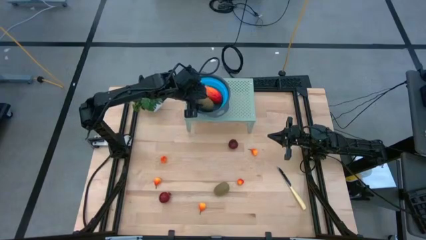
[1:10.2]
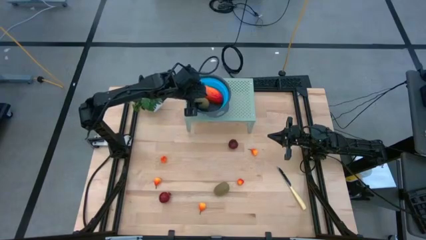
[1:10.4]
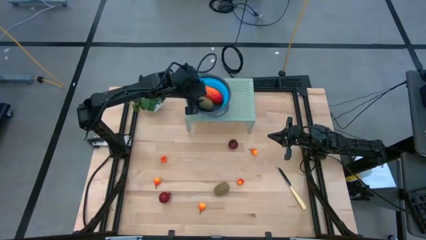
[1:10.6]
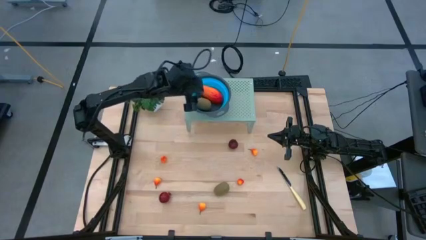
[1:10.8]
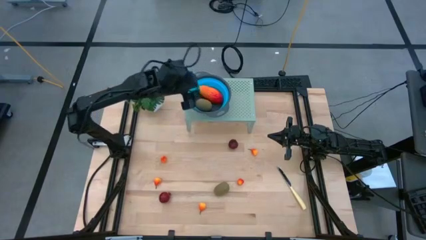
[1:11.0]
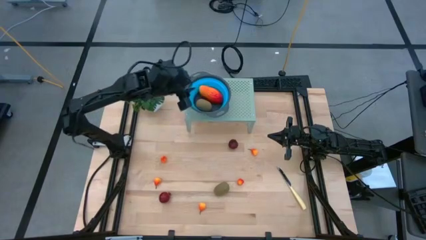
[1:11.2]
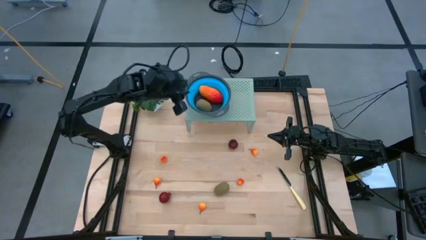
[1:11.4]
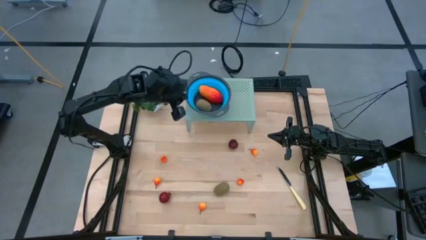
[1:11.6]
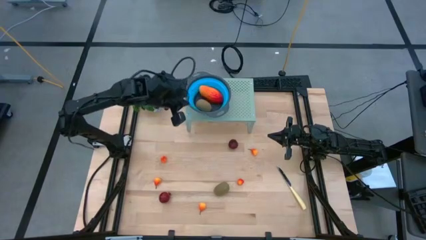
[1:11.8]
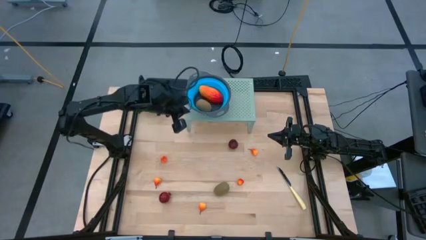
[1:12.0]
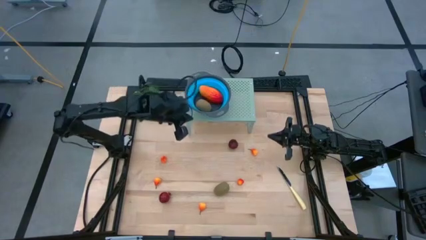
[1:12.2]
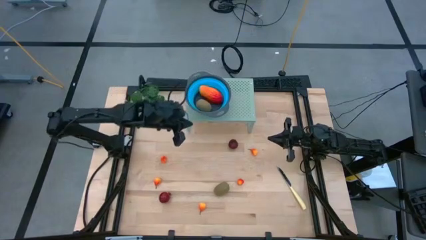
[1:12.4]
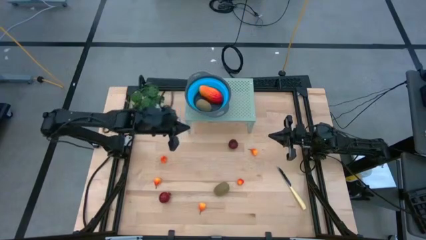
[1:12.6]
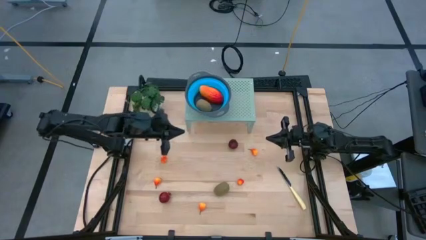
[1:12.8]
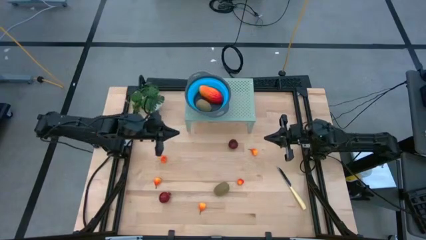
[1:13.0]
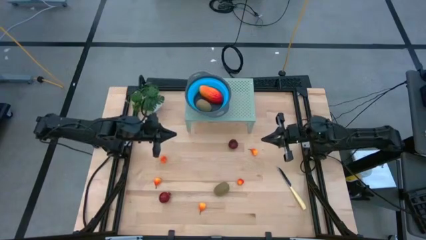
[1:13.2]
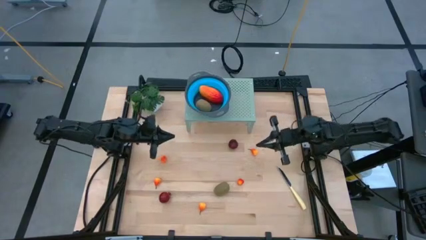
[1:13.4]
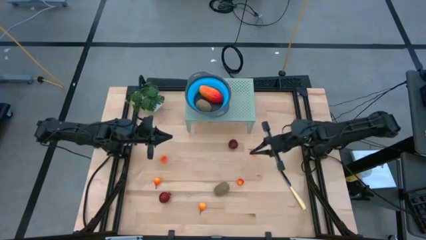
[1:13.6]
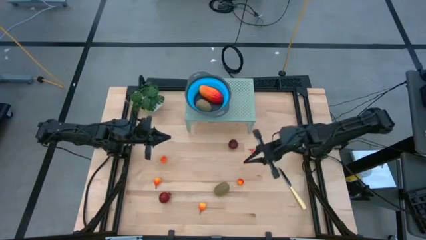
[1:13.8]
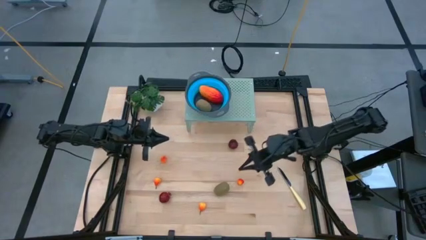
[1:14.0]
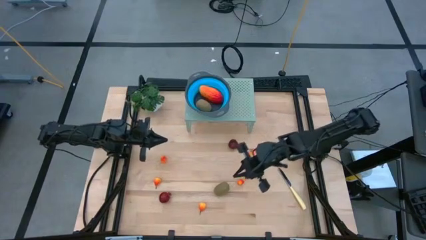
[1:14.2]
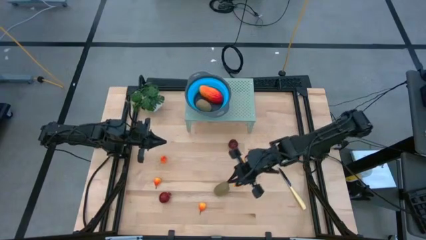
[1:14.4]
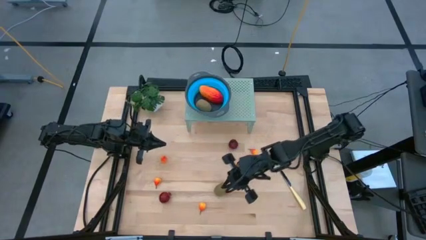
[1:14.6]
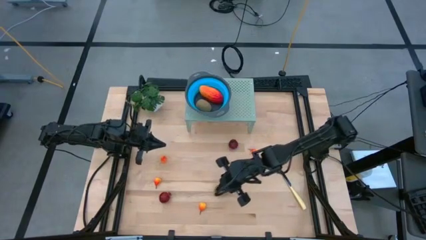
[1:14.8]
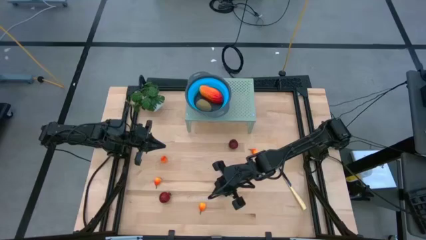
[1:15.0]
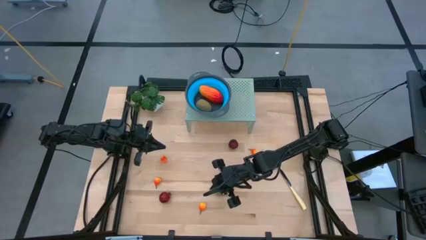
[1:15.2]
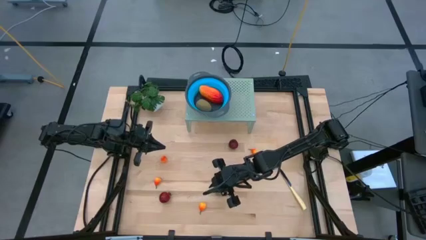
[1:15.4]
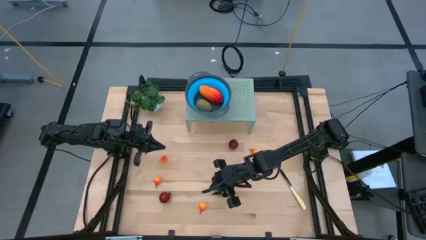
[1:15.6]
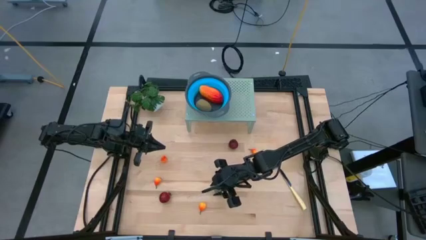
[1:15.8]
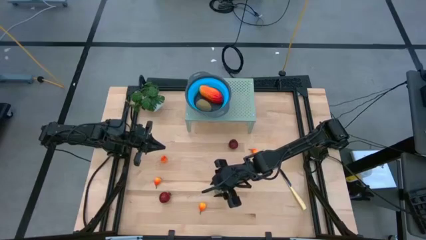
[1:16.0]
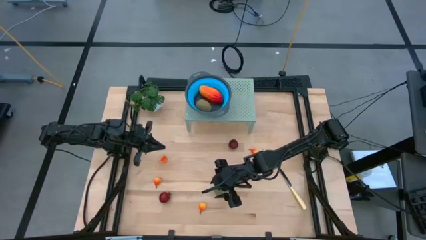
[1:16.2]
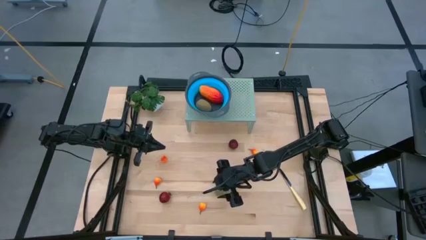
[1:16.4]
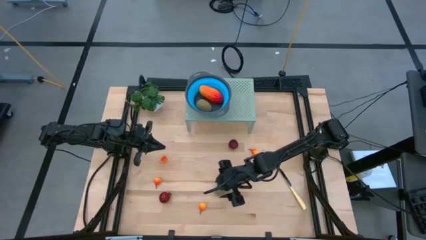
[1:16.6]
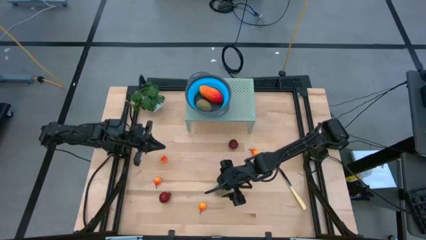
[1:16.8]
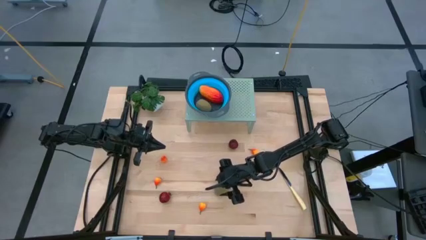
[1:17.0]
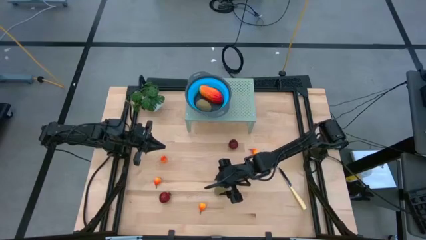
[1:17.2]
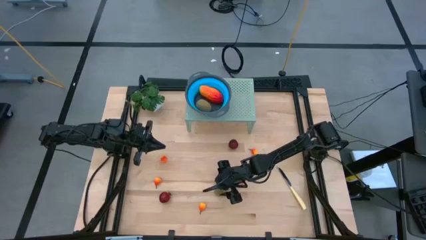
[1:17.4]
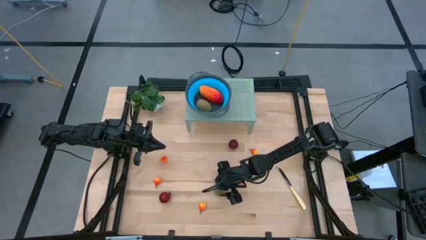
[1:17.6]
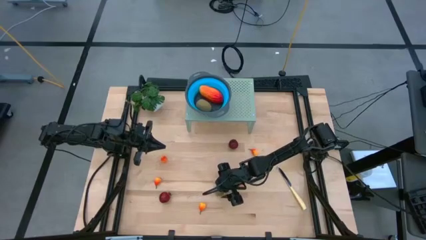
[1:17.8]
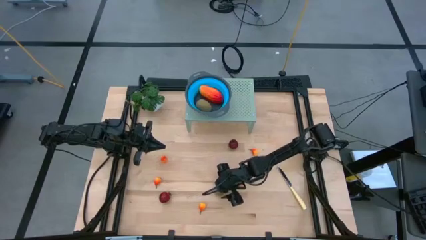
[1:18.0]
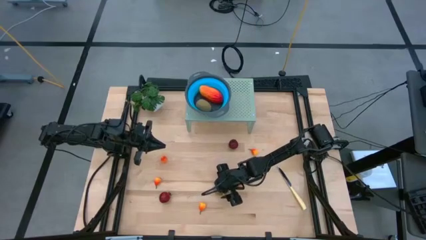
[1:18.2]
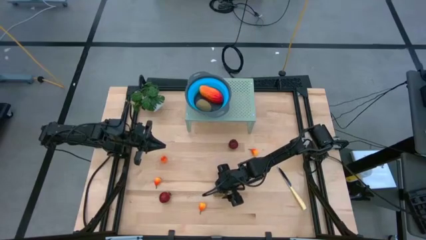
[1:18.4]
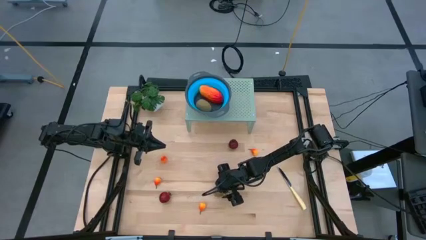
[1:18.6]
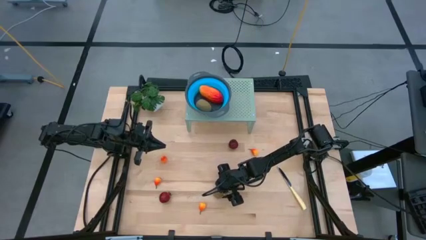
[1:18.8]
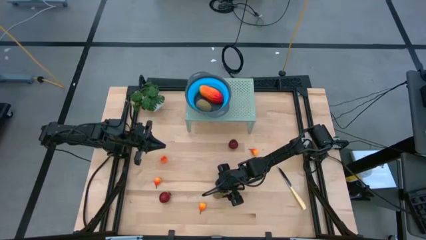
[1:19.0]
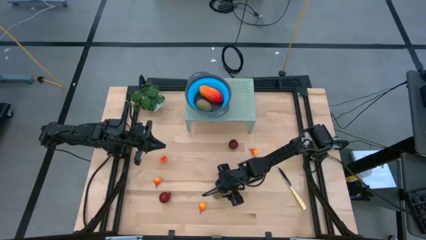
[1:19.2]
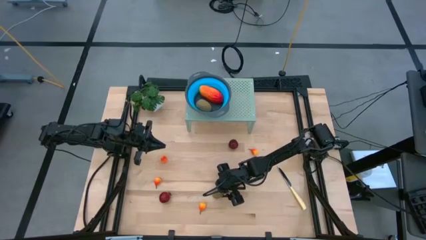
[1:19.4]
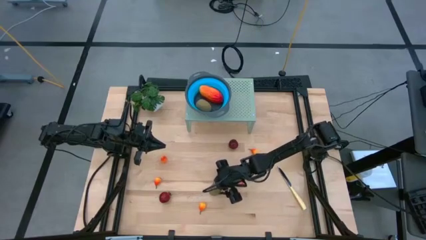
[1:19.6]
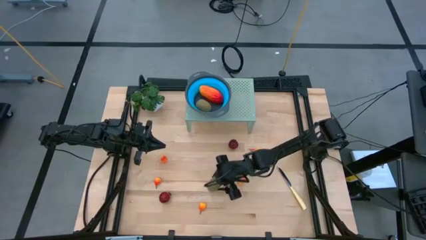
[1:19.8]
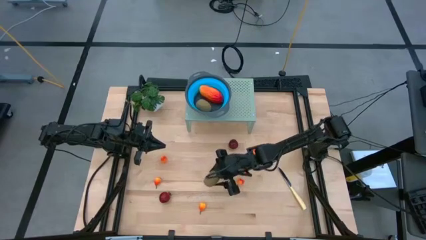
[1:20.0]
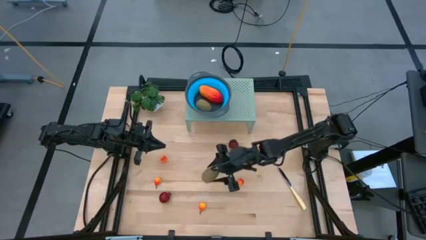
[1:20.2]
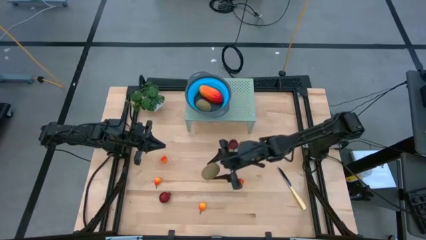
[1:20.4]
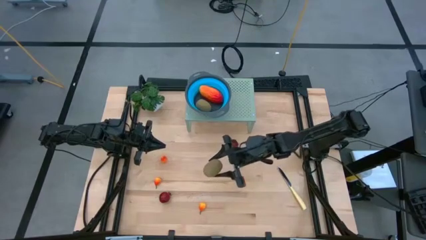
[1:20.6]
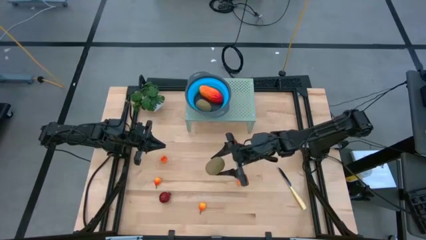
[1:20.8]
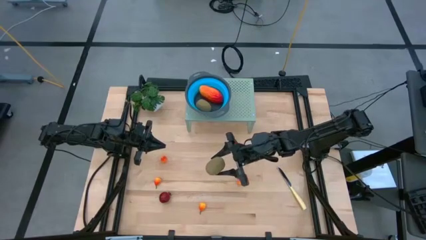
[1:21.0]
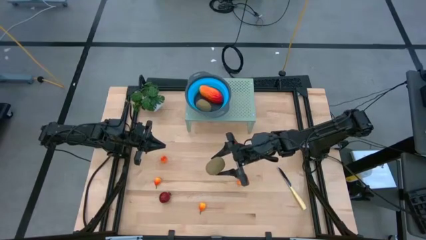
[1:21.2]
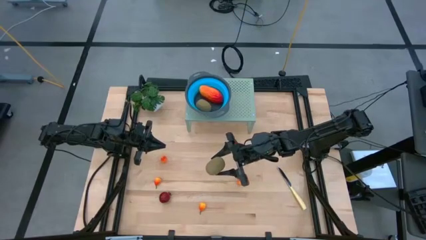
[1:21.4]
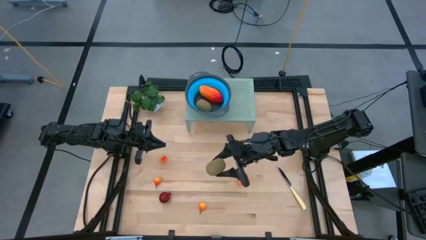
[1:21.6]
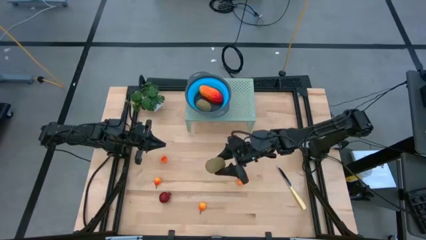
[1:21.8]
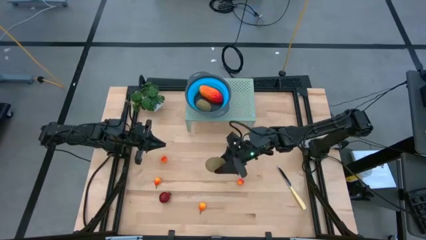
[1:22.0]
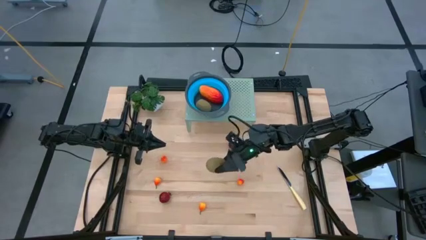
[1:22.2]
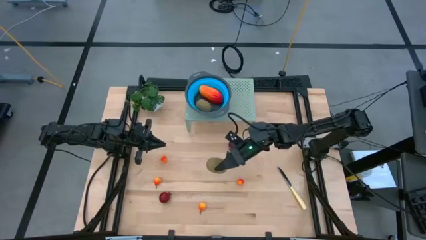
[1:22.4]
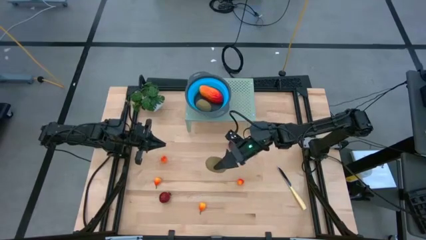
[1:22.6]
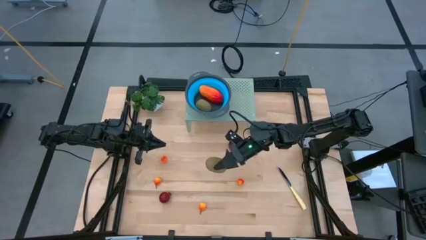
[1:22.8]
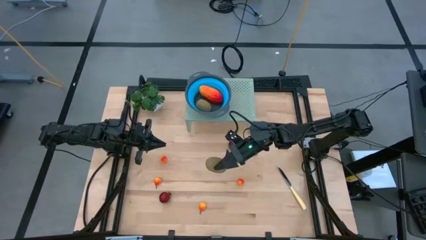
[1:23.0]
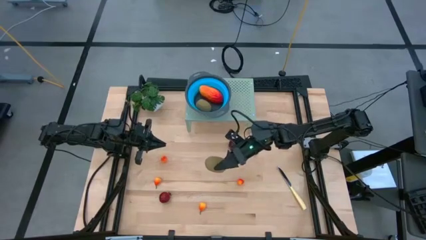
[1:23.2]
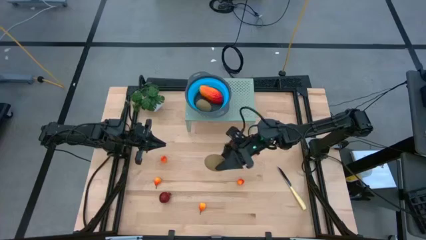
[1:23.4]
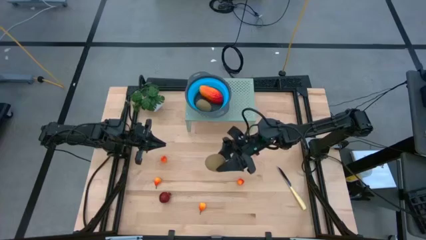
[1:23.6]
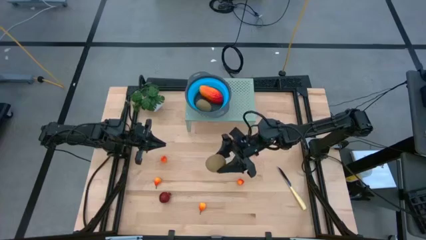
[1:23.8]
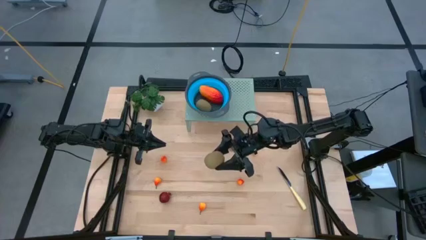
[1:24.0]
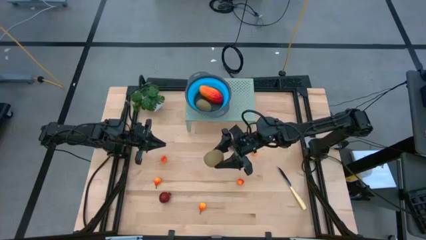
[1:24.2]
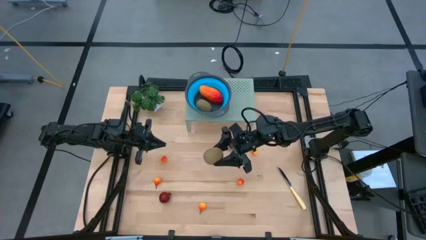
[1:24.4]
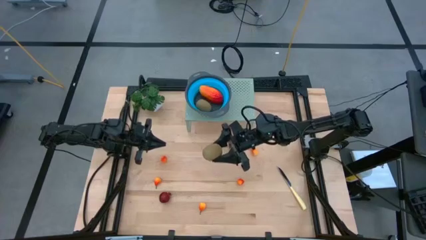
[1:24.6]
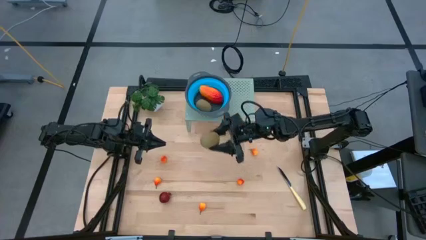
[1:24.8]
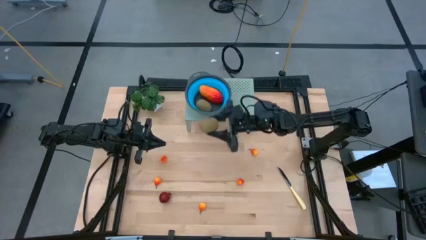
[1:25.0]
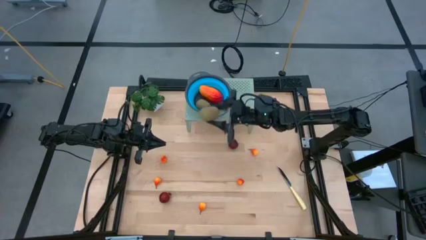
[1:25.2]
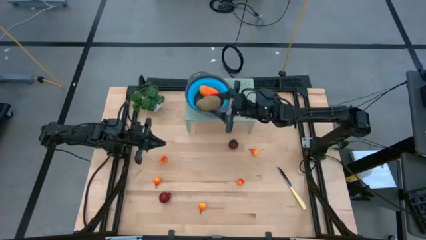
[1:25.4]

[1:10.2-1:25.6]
Task: Pick & Place Fruit
Put the brown kiwi into the blue bowl on the shelf
